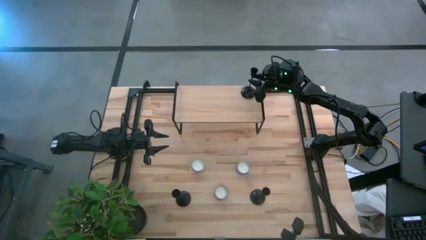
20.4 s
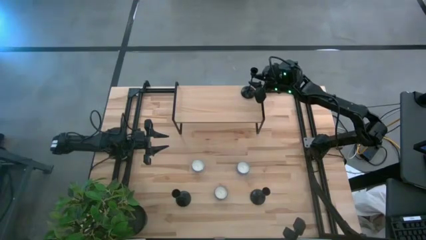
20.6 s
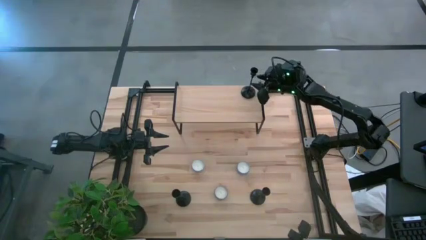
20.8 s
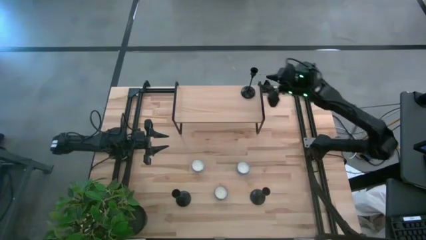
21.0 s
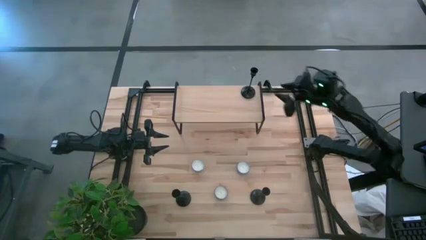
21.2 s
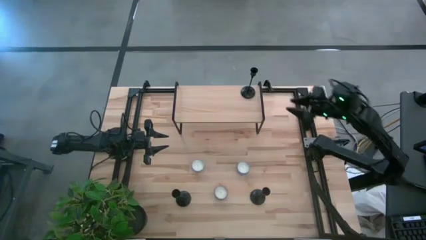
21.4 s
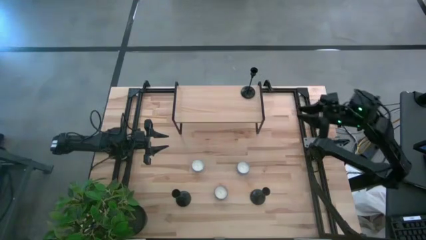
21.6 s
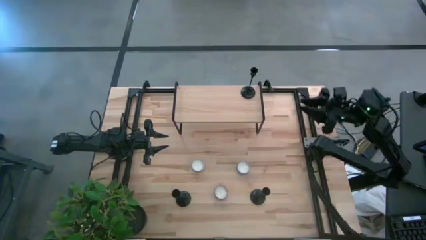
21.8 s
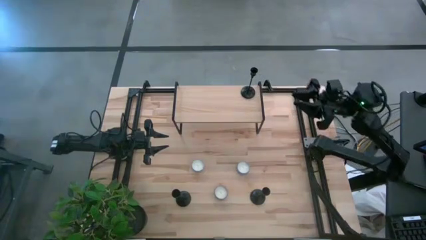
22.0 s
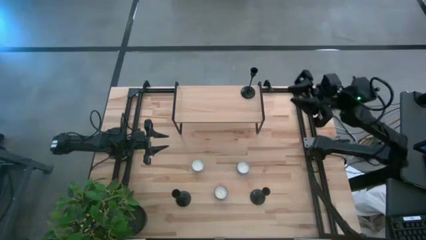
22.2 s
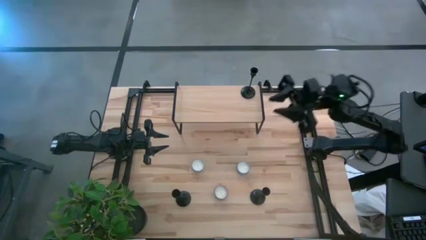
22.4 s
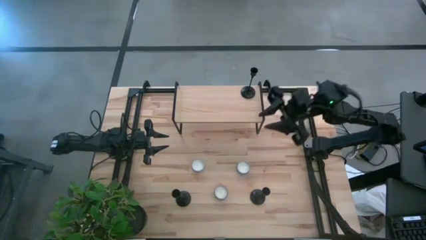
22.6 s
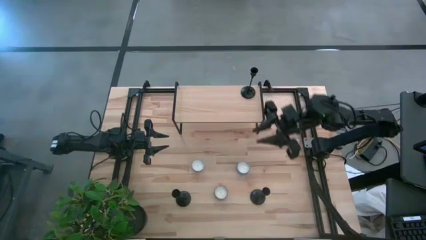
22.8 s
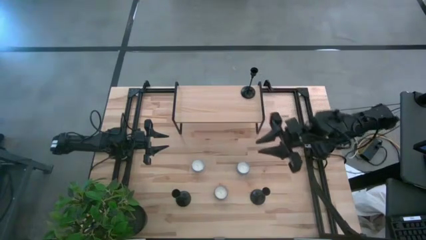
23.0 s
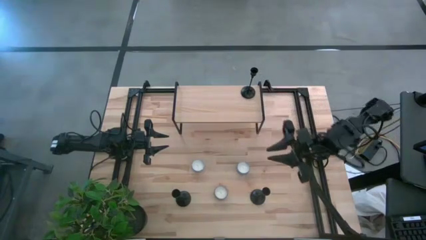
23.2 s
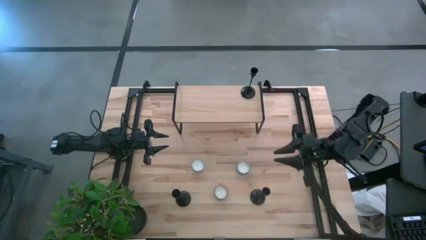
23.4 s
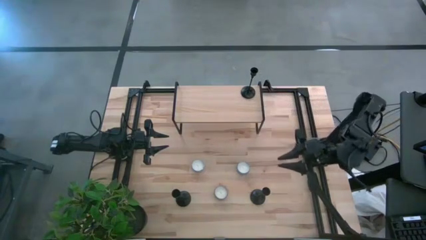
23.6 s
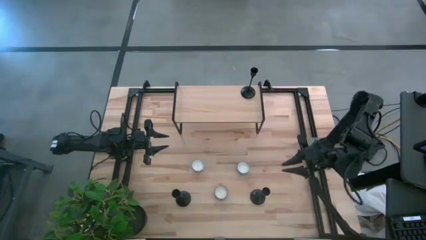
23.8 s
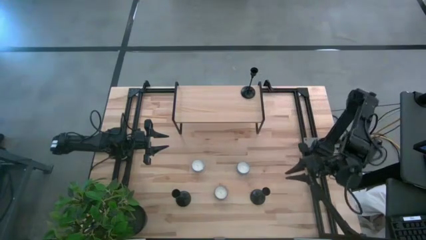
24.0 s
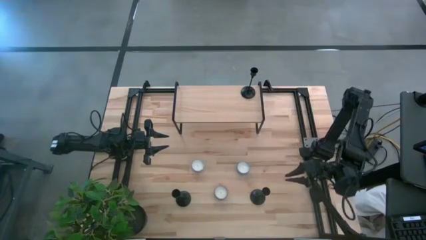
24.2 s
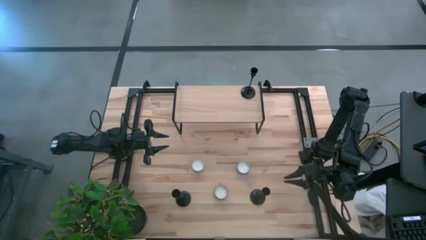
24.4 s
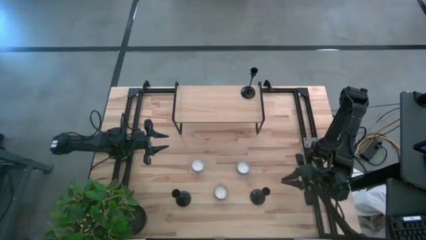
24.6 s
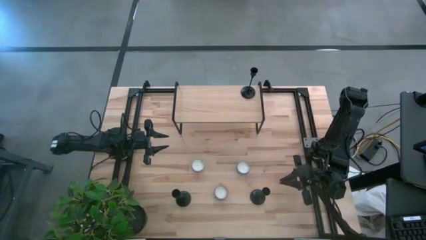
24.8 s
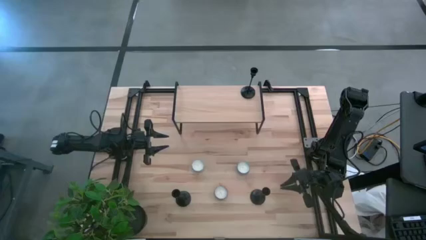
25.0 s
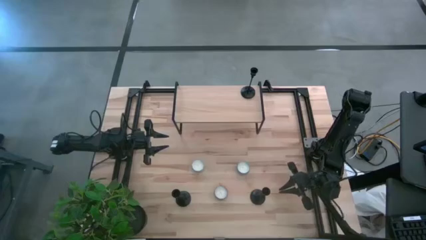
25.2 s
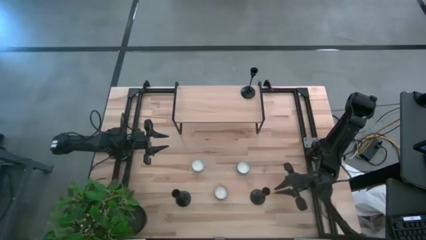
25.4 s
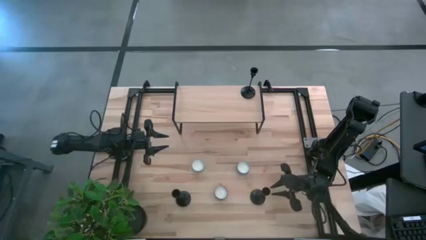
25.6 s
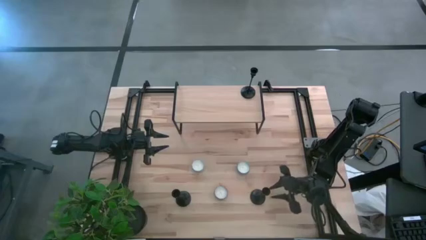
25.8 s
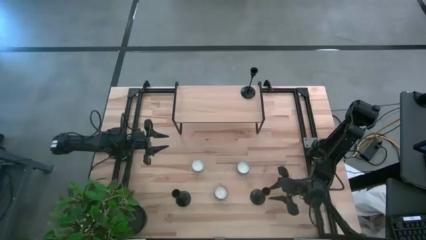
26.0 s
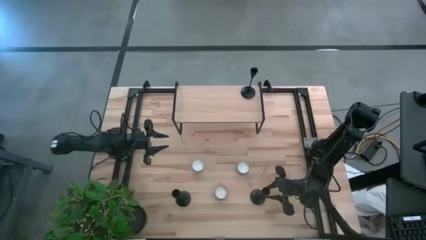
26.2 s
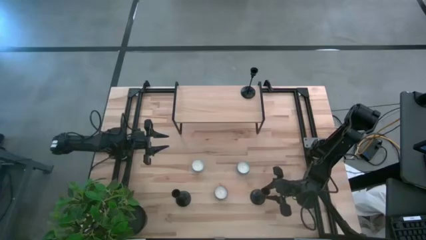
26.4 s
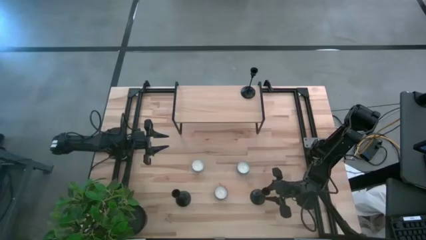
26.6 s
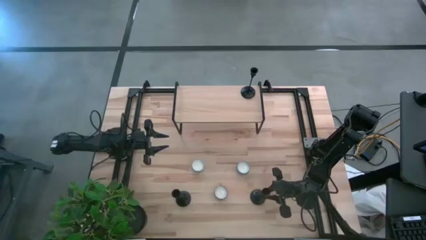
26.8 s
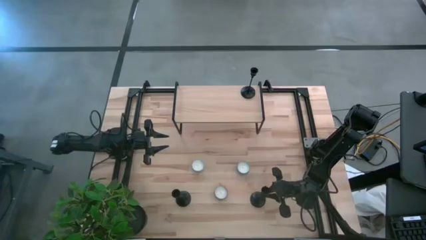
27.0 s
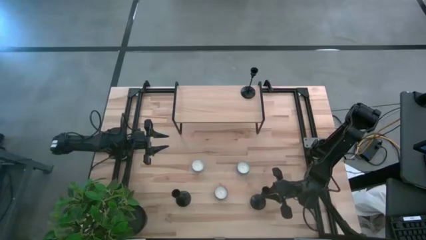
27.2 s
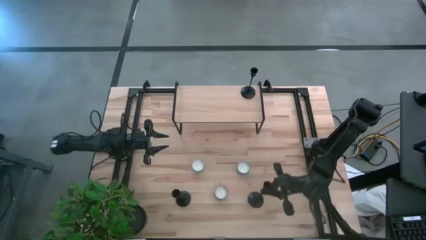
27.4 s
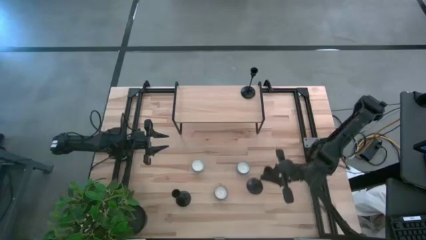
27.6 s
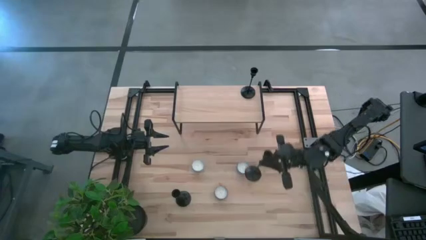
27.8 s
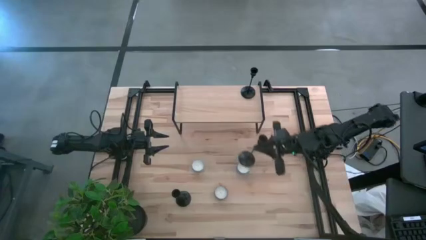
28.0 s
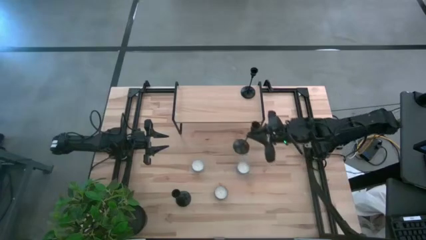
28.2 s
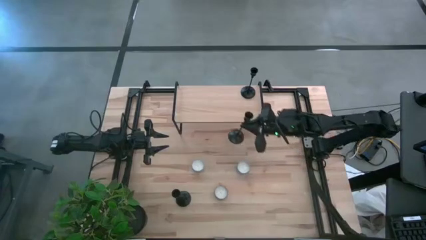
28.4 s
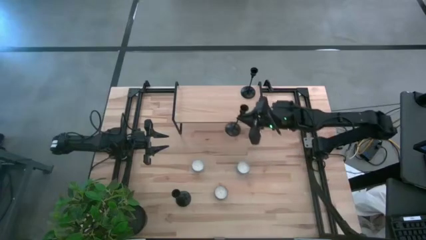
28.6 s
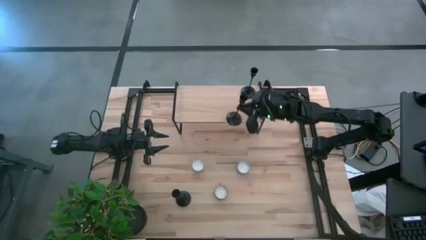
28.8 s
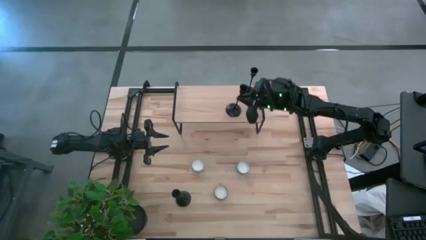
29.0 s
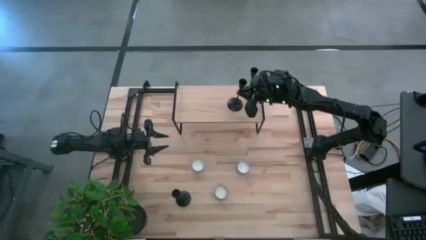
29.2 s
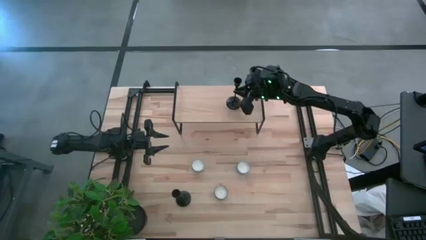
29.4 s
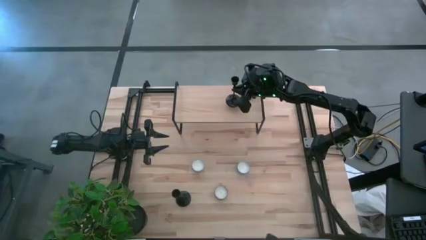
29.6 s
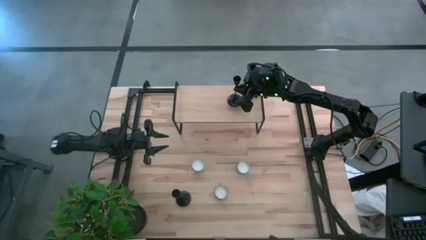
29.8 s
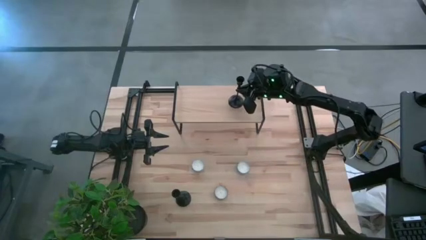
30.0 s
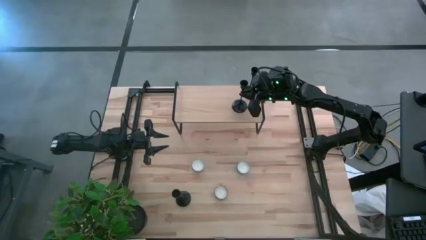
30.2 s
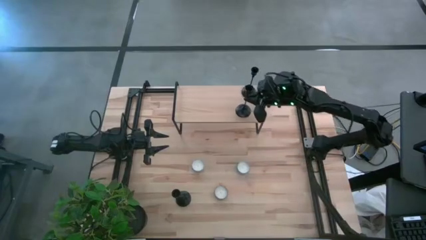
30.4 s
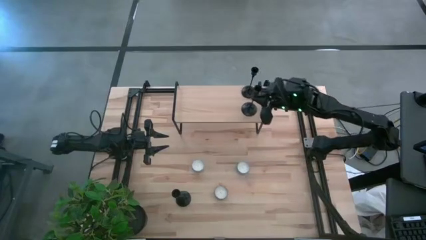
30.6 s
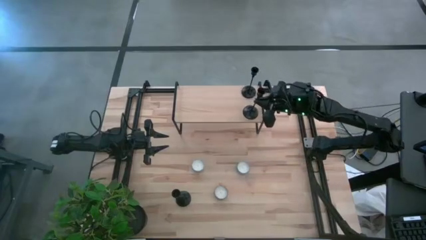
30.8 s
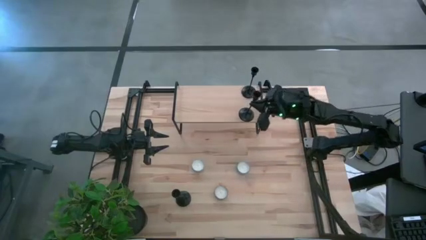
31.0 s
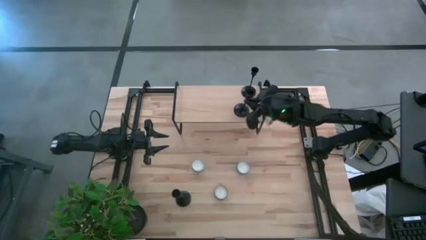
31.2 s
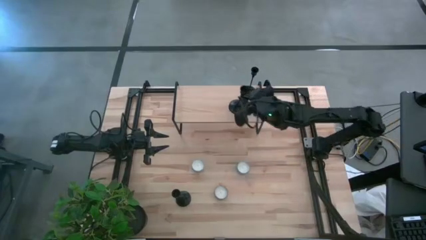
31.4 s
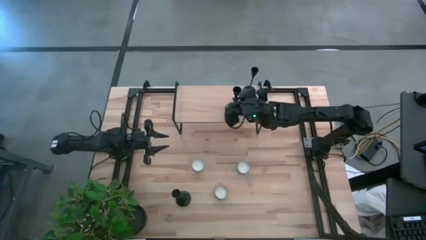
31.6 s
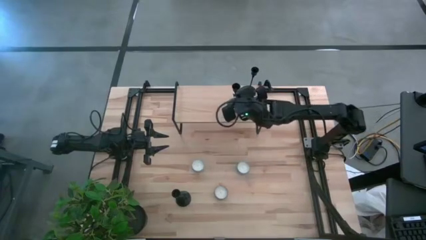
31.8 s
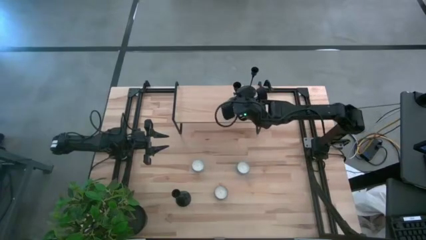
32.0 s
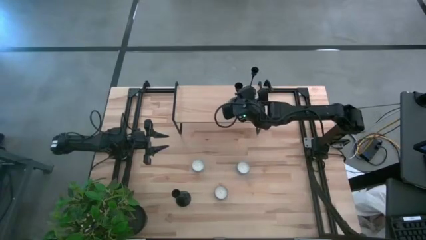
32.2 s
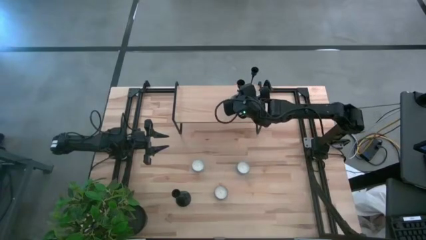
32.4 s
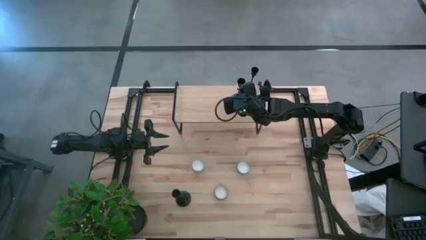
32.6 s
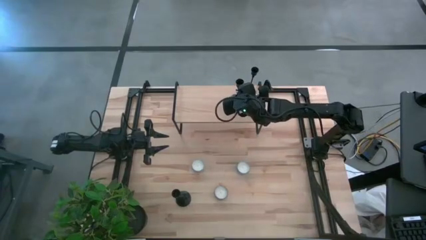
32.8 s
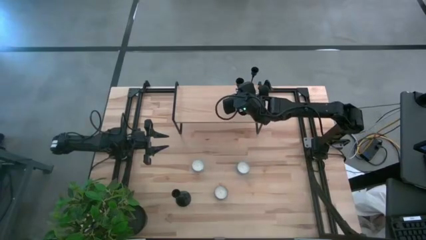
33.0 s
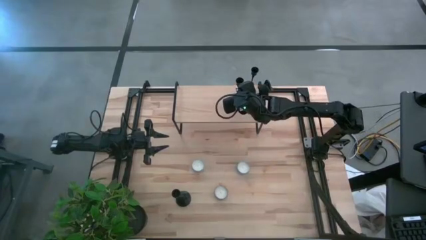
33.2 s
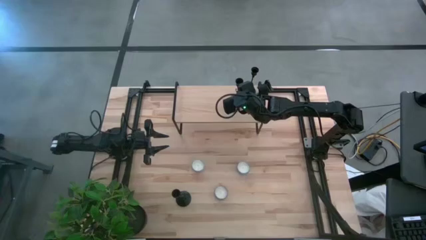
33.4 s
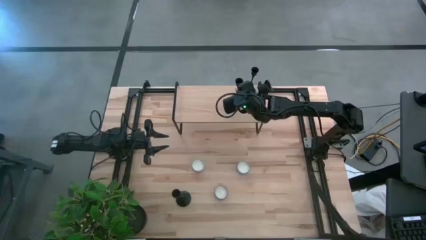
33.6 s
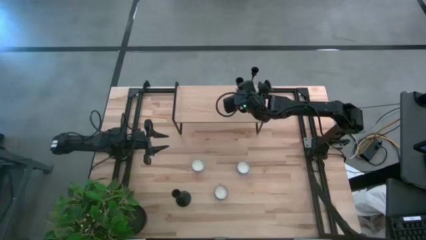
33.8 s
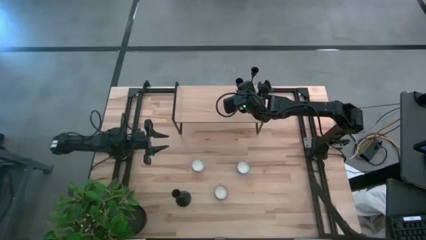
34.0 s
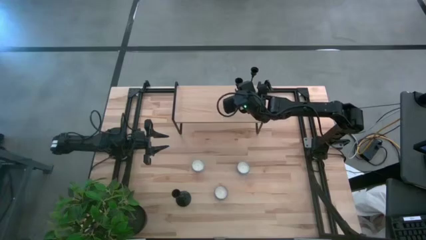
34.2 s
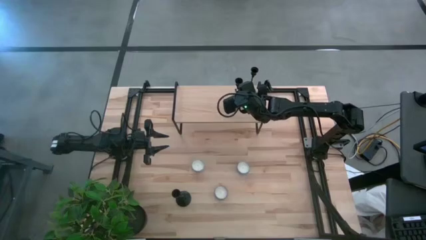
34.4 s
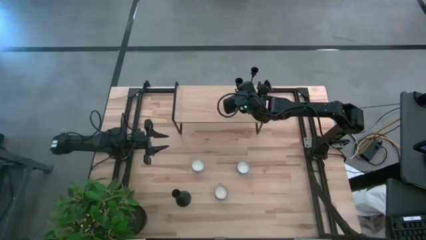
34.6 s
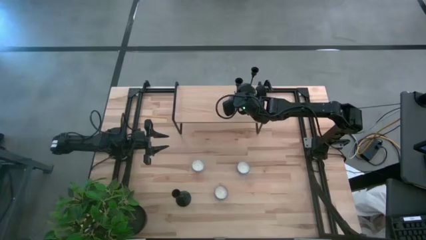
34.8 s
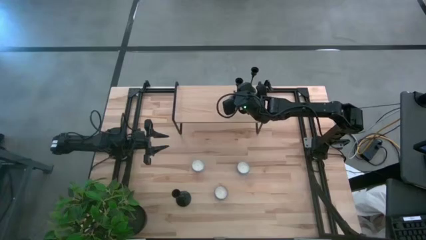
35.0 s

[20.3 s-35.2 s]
Task: Pick & Place candle stick holders
Put the right black candle holder on the shelf
